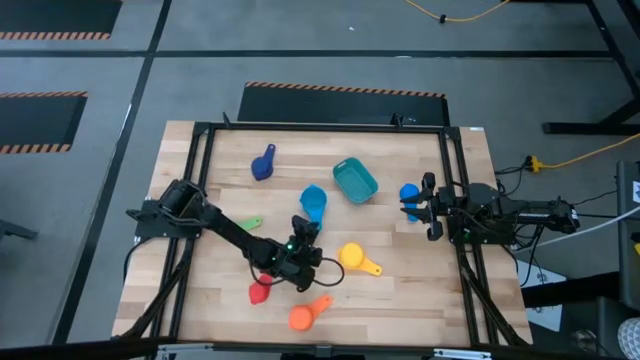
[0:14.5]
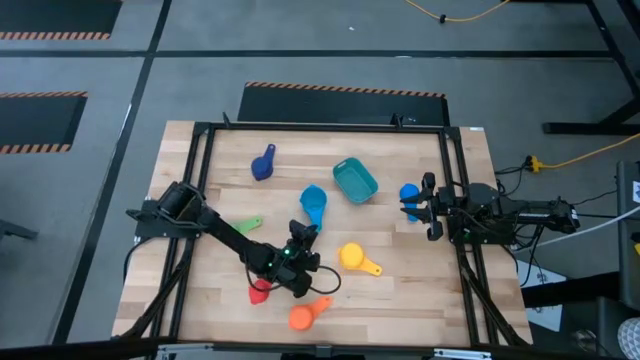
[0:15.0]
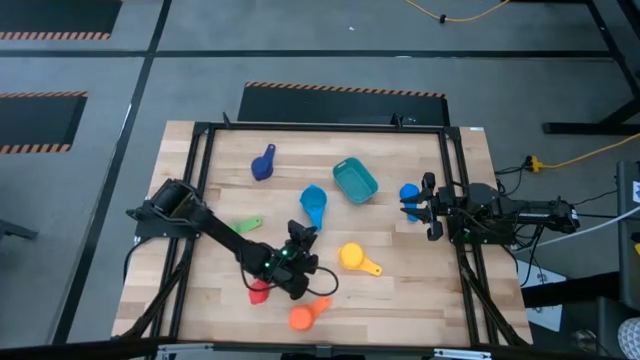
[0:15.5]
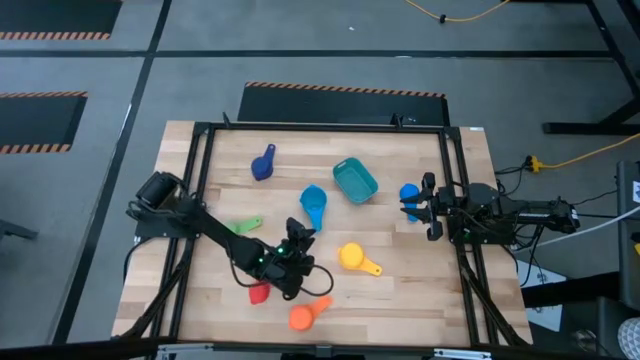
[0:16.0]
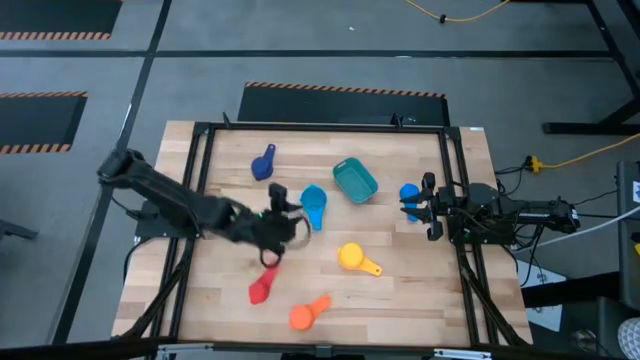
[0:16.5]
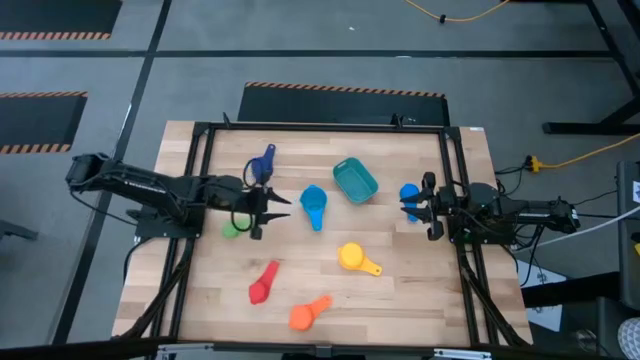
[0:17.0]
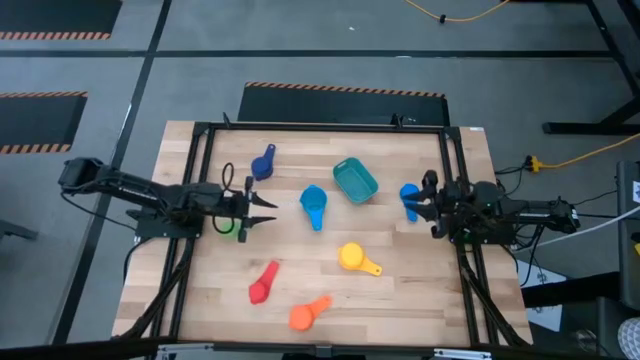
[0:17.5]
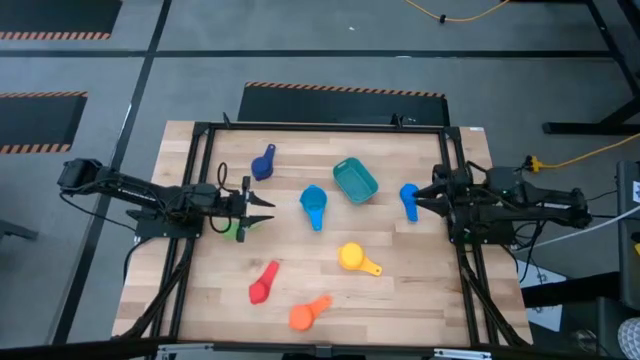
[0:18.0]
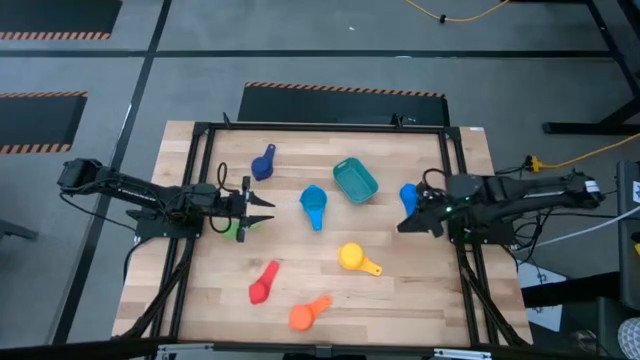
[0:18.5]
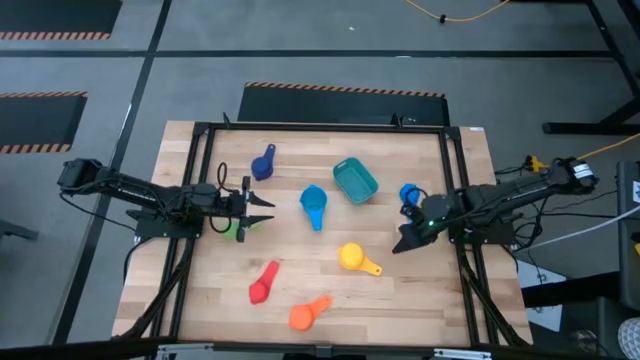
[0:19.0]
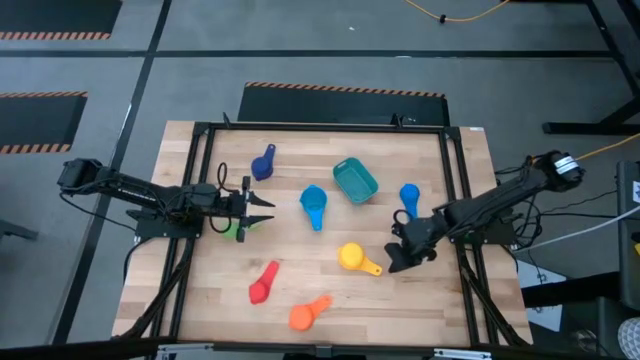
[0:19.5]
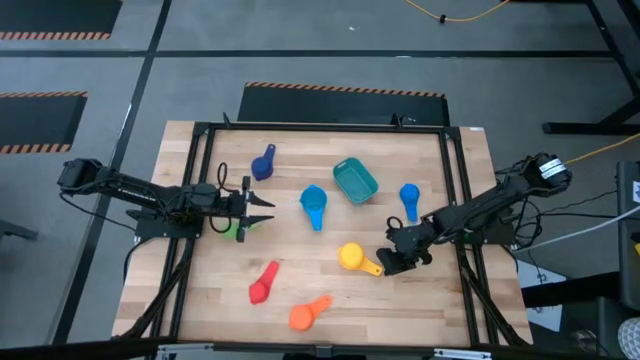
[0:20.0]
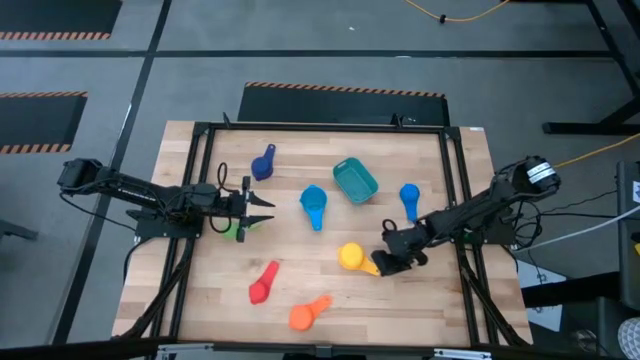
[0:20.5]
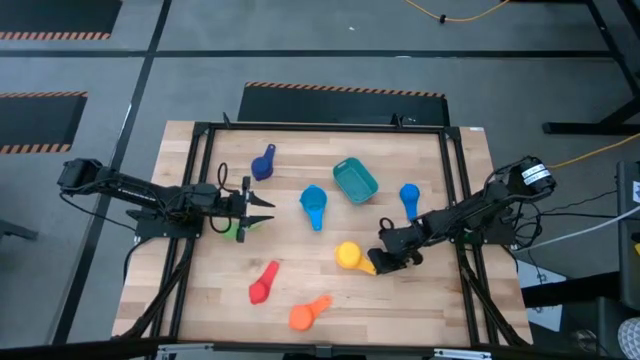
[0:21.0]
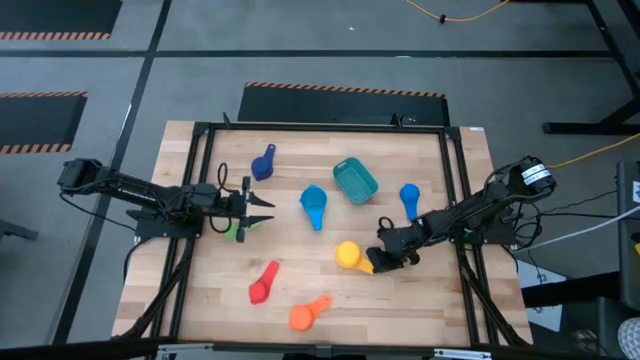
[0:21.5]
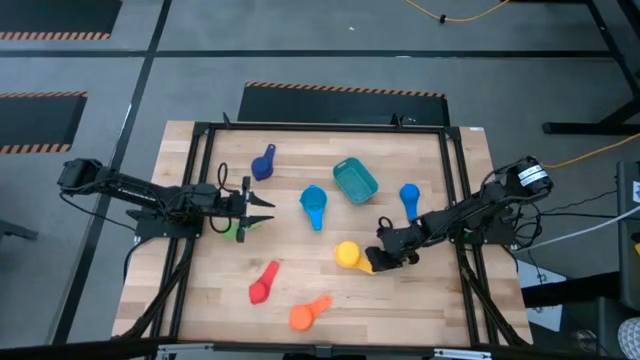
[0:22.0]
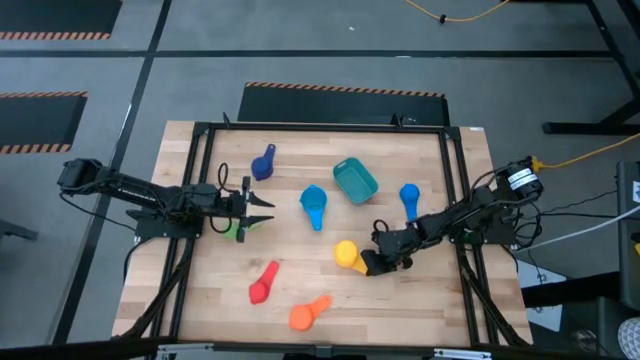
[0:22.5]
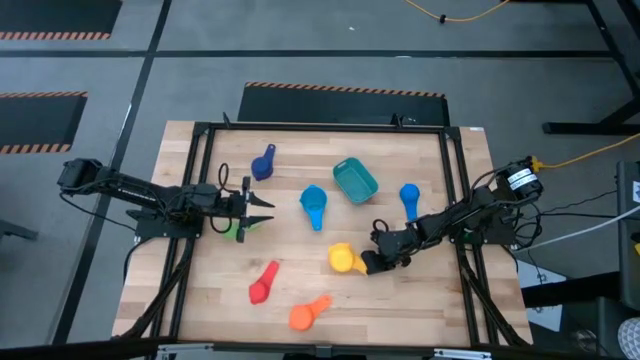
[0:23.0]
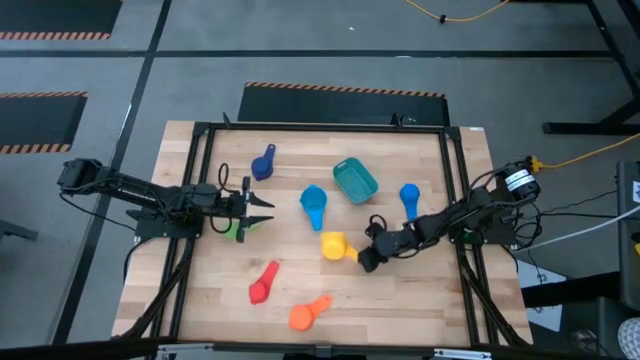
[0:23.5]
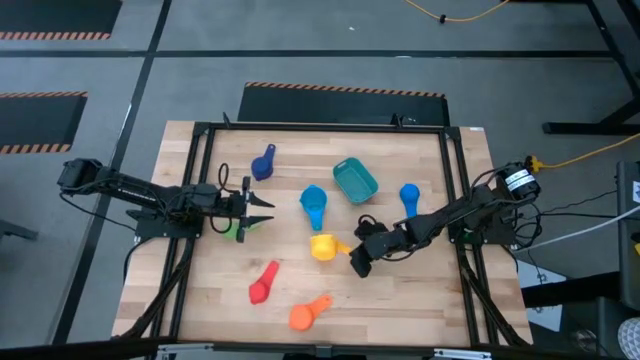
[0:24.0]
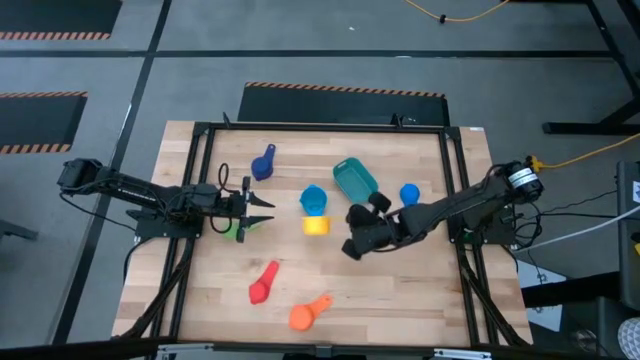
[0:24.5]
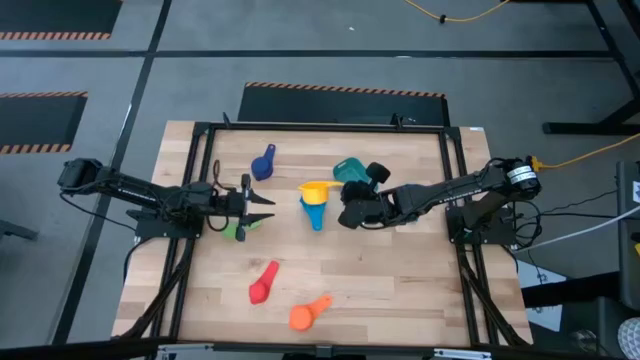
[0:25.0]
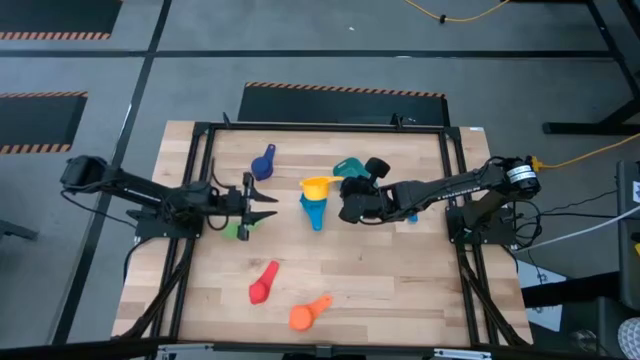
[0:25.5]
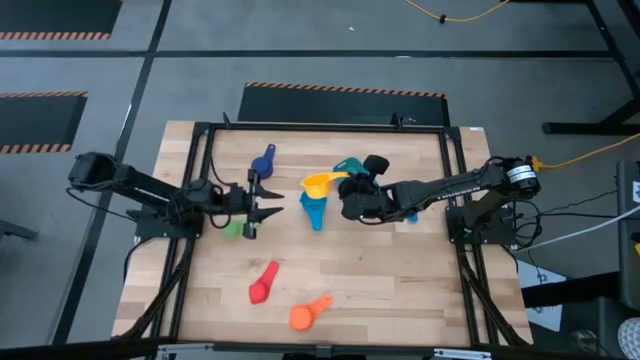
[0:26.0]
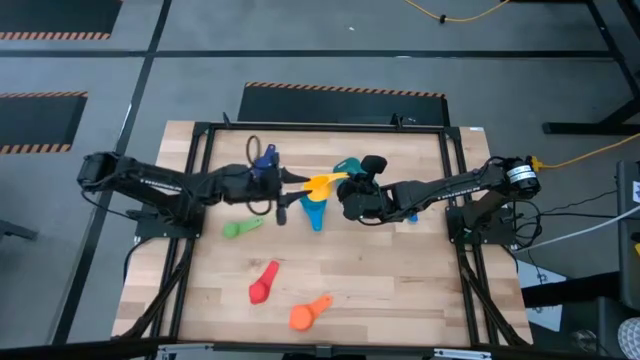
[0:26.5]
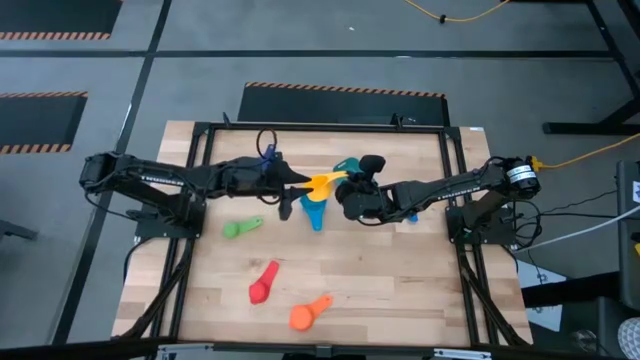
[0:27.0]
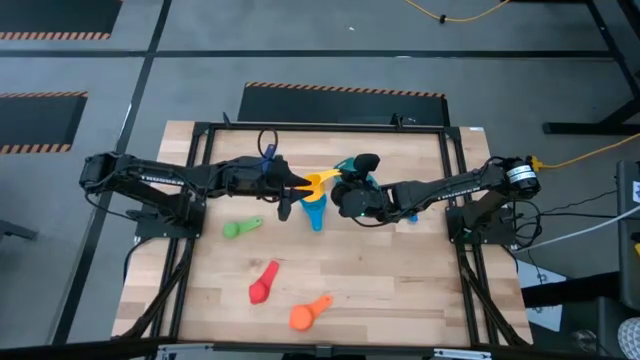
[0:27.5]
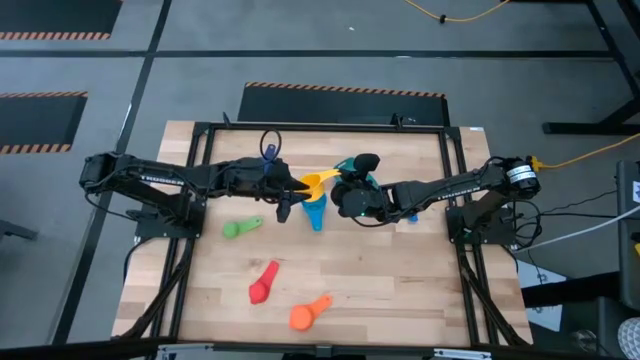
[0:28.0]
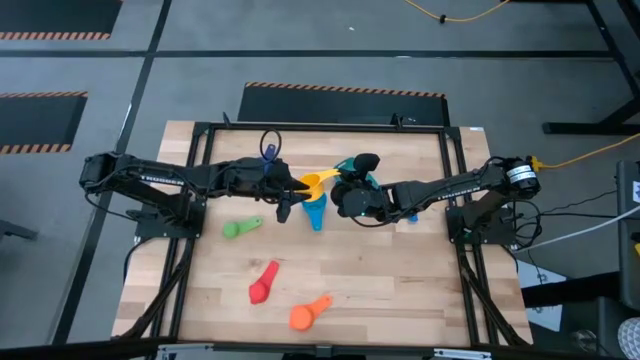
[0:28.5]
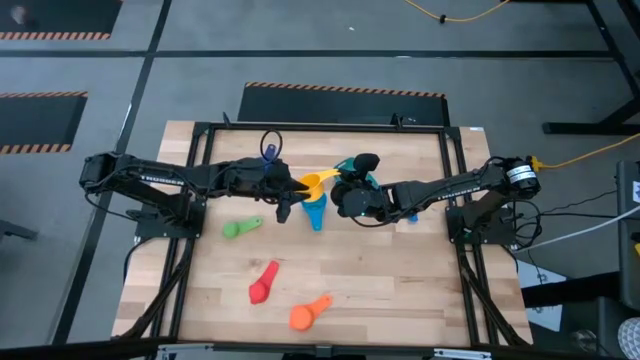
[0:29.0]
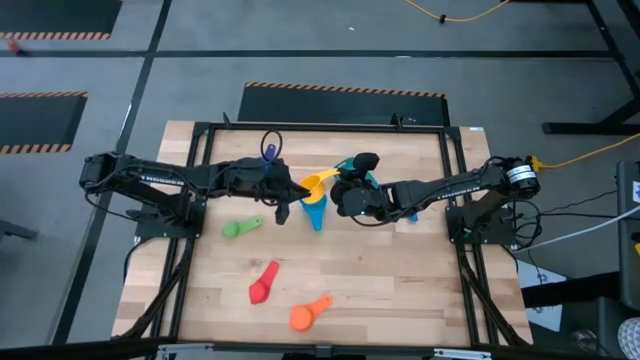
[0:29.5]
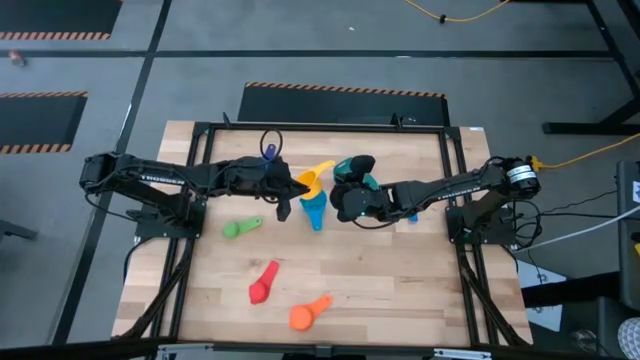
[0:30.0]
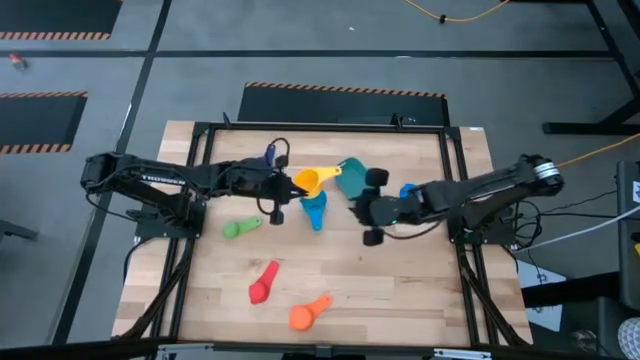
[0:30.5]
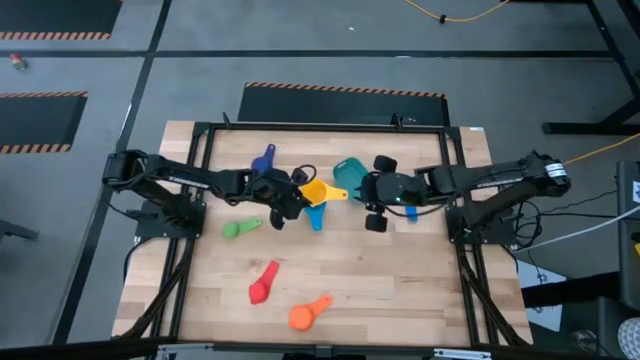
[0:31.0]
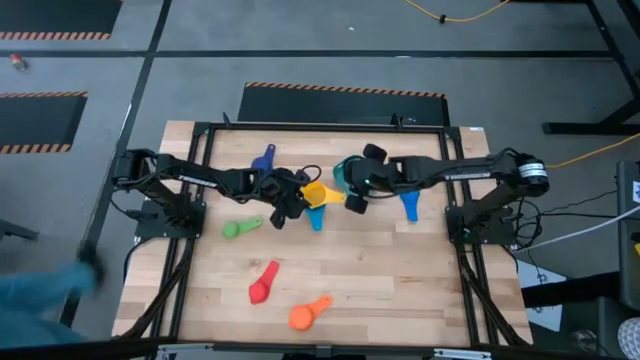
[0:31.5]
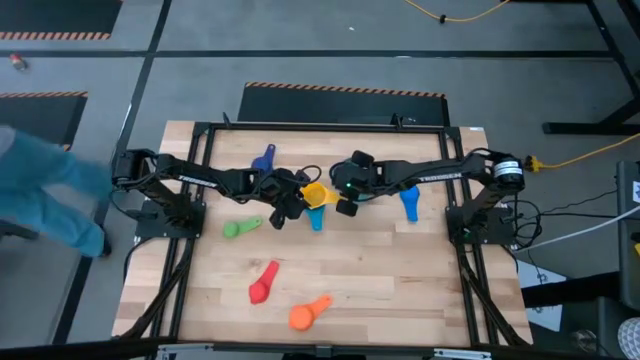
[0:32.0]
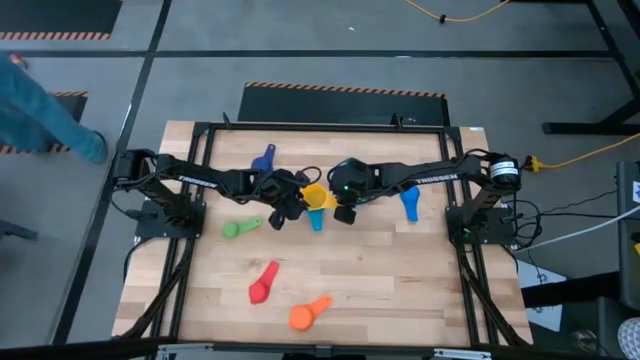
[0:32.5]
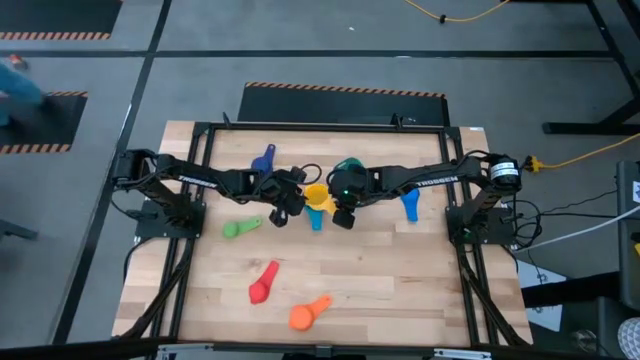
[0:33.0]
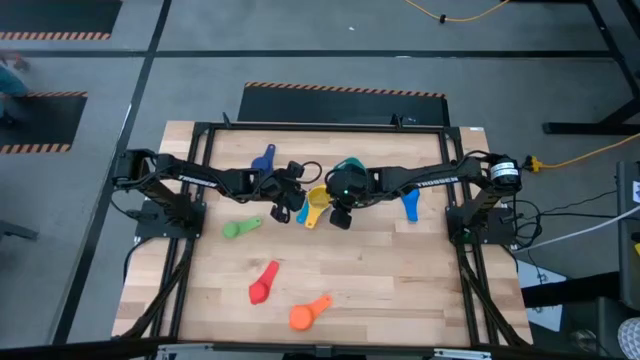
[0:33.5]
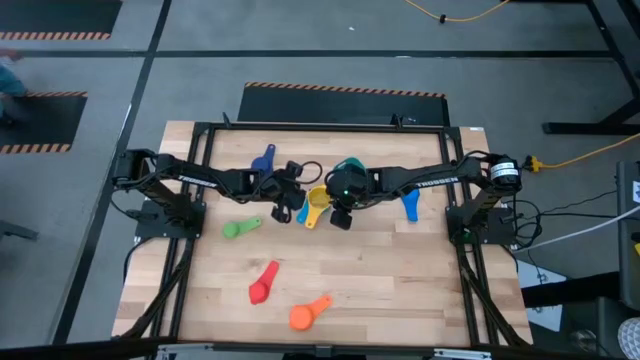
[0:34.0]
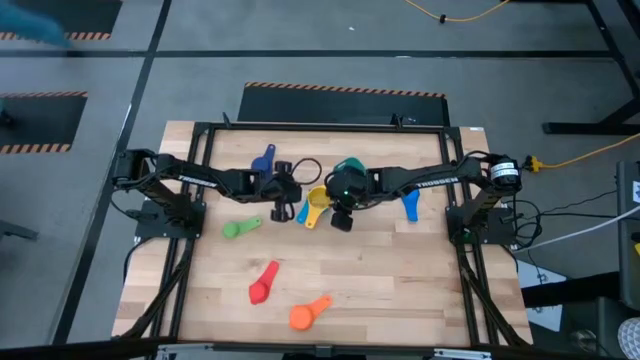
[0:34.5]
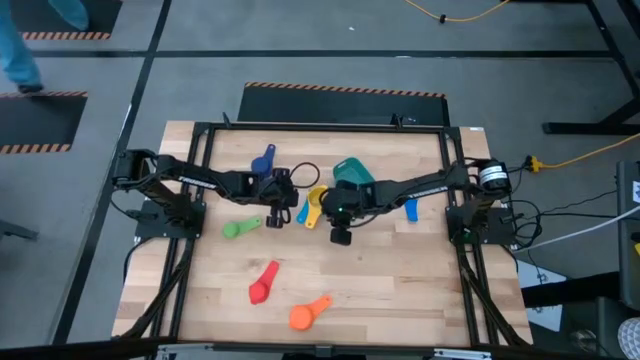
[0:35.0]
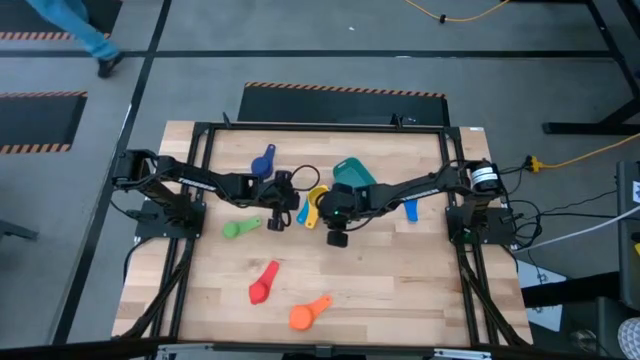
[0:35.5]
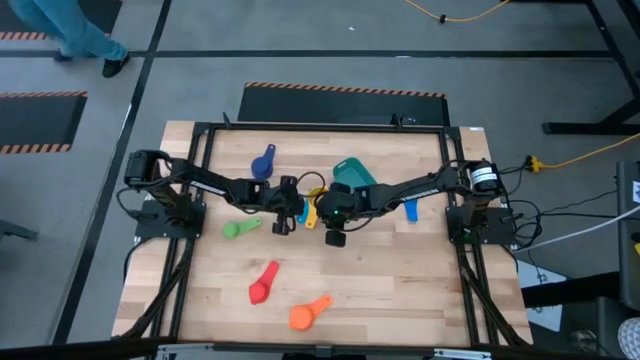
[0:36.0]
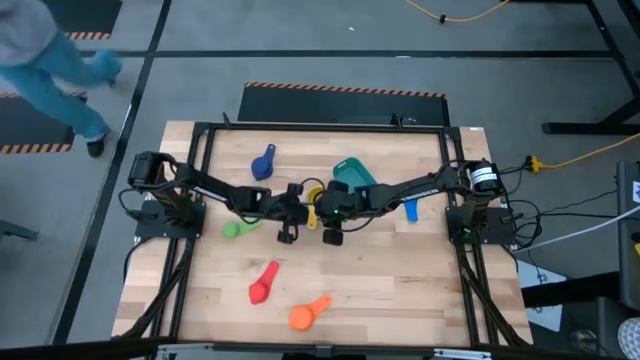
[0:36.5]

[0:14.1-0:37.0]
Task: Nest measuring cups in basket
Stack the yellow measuring cup on top of the light blue measuring cup
